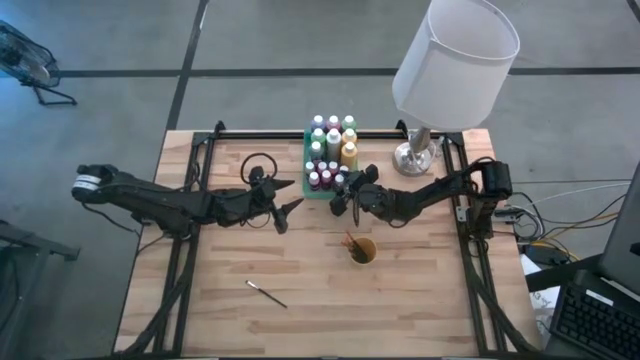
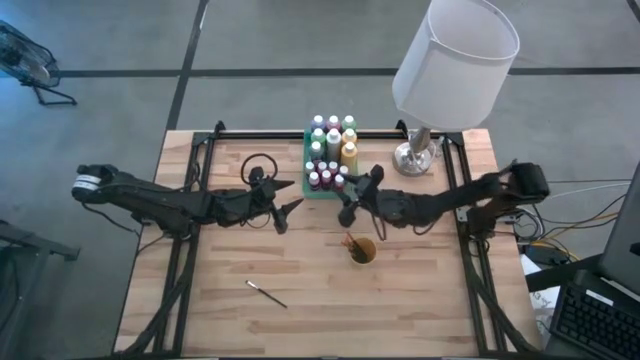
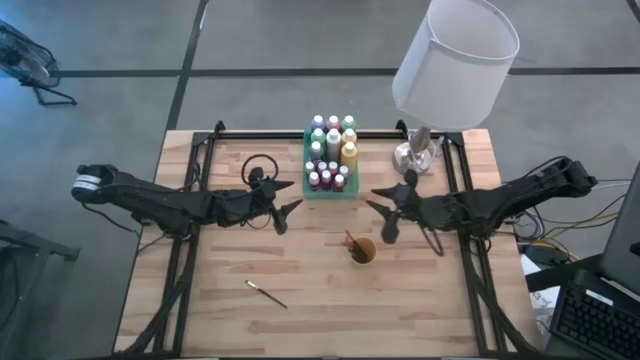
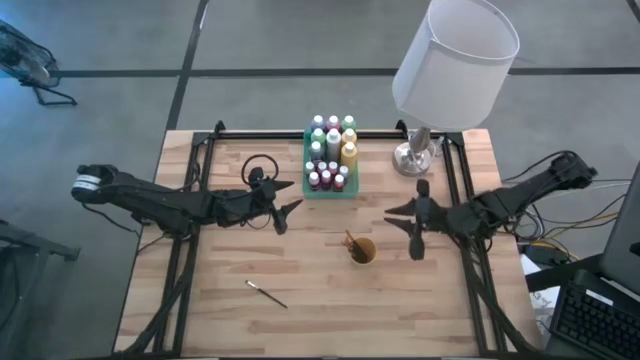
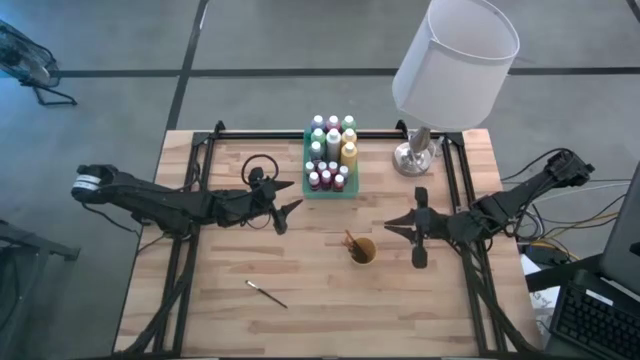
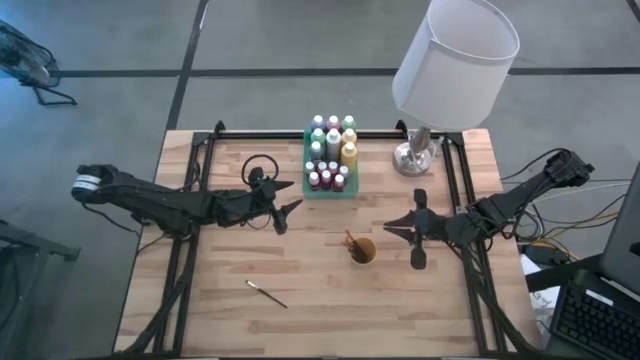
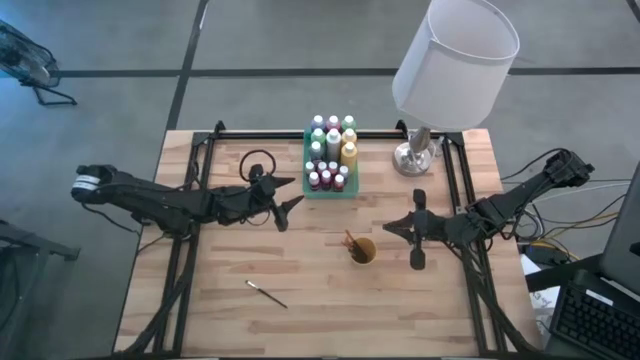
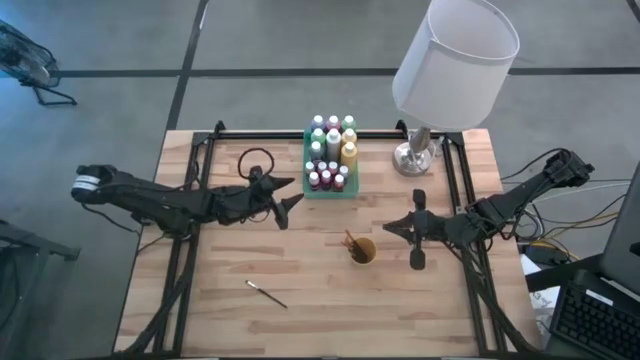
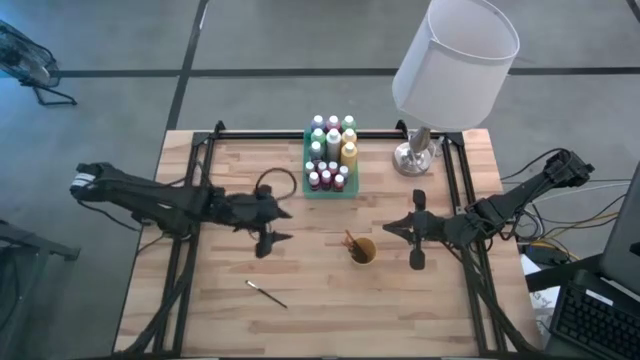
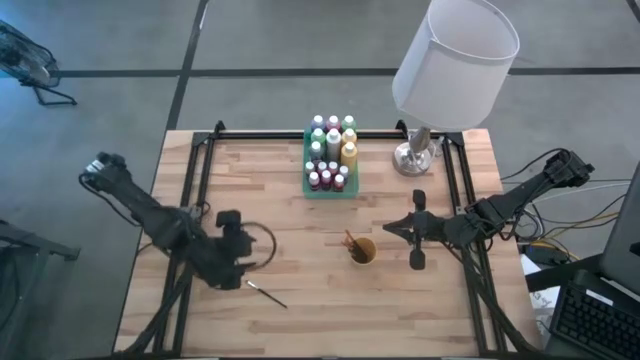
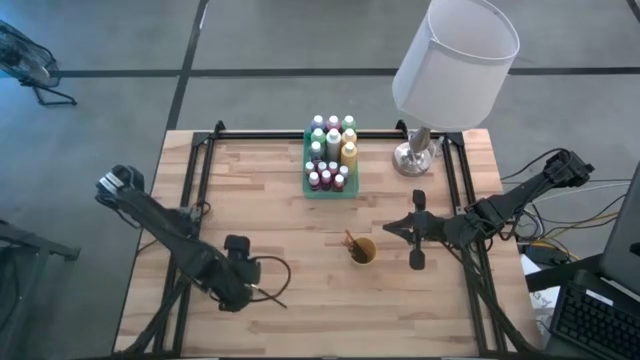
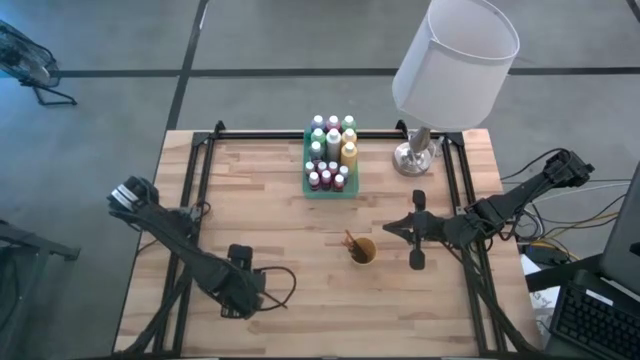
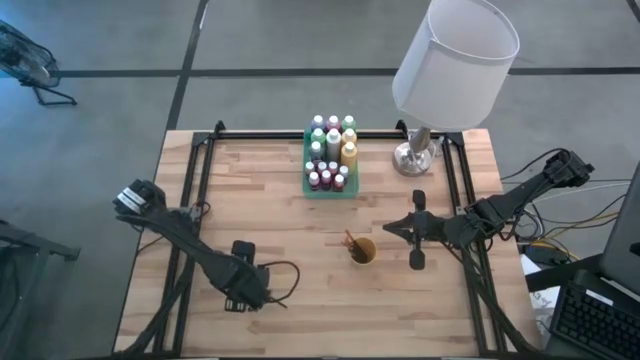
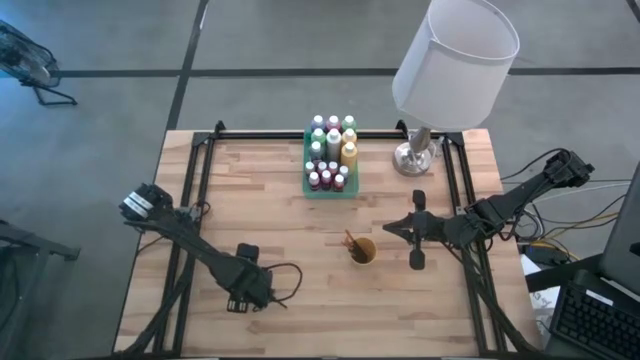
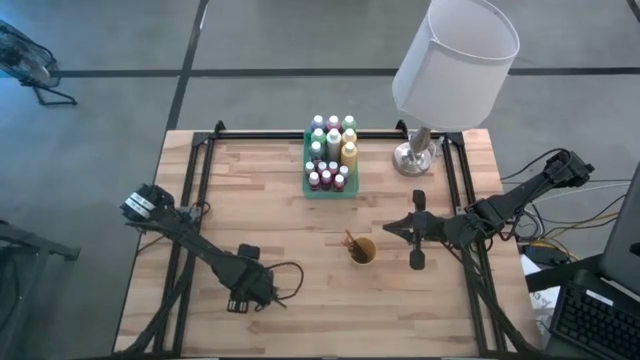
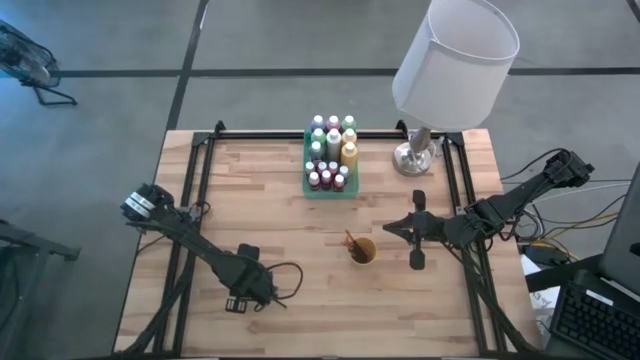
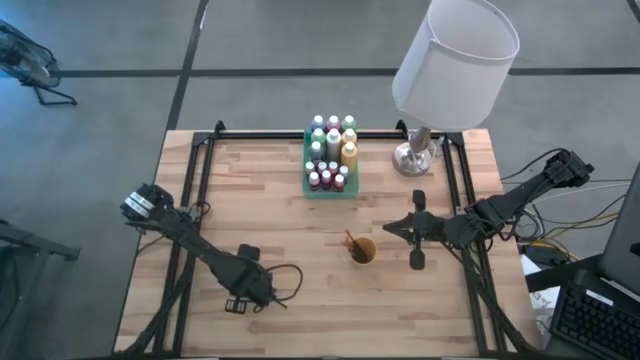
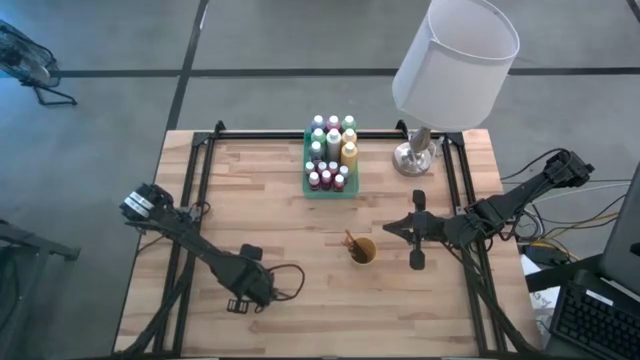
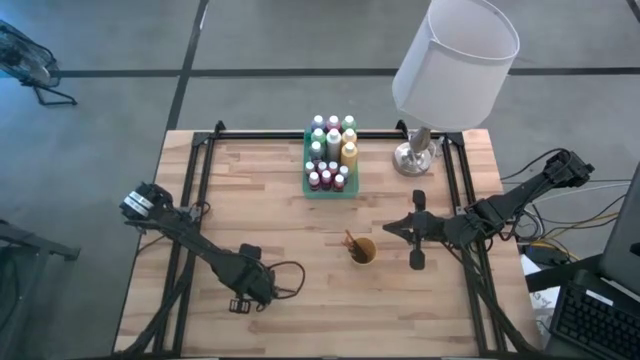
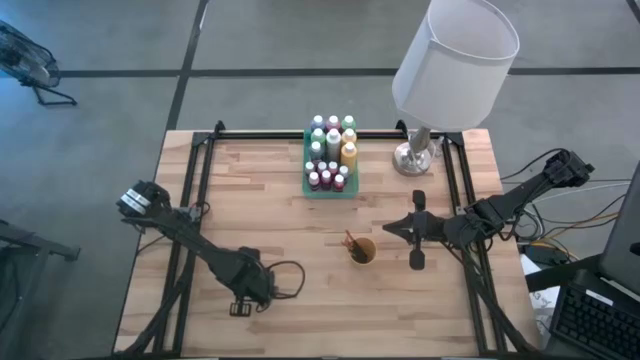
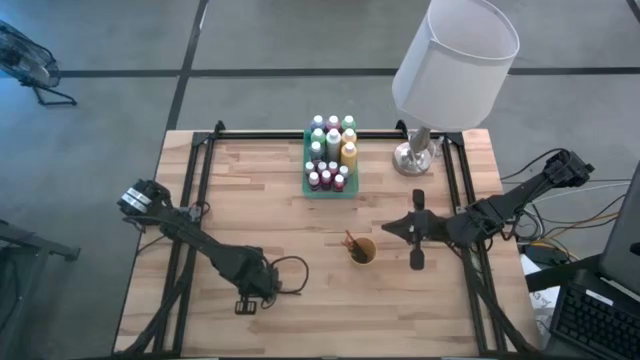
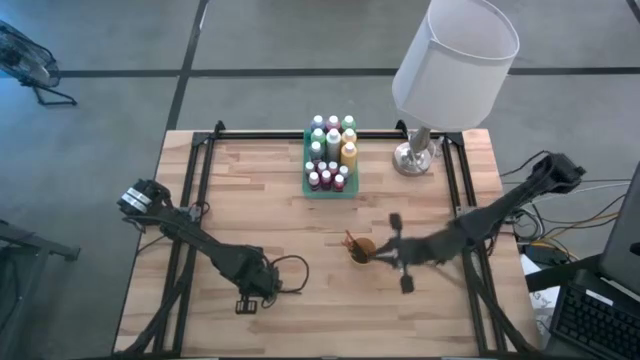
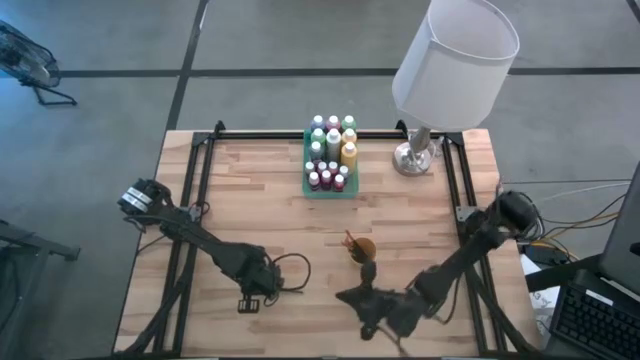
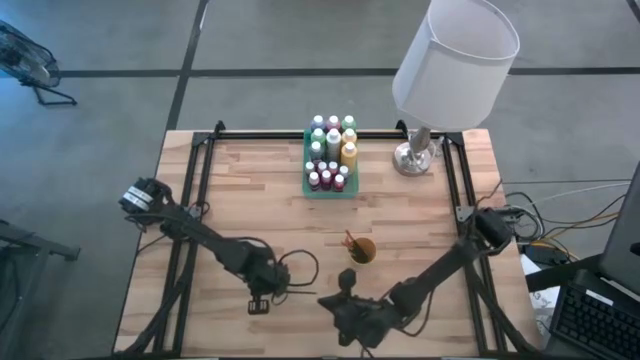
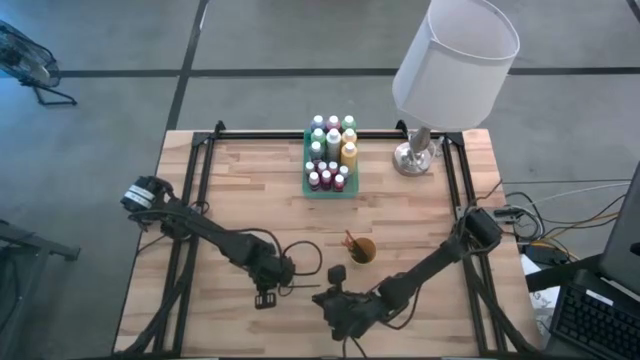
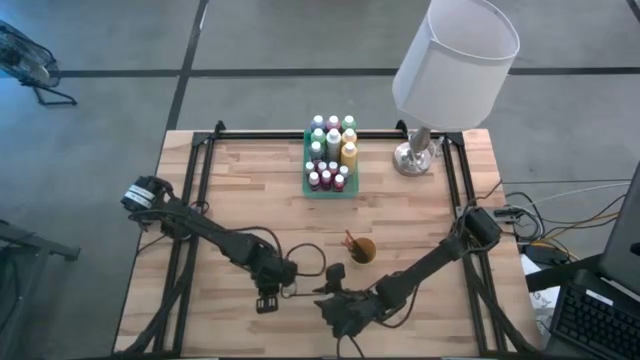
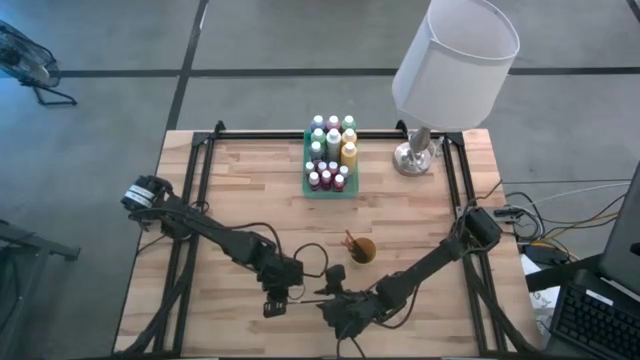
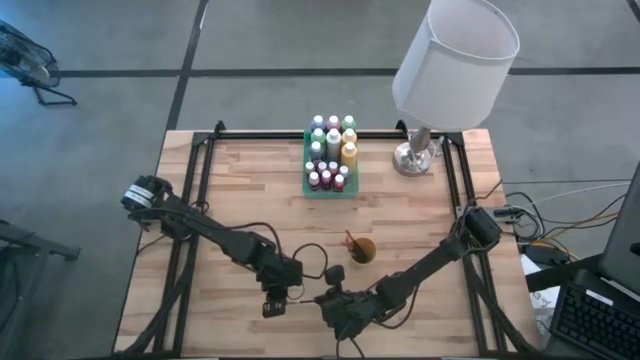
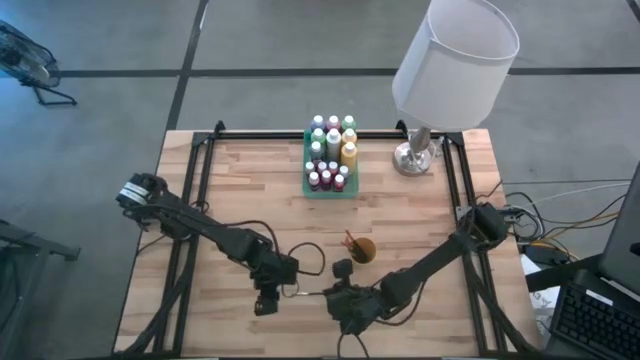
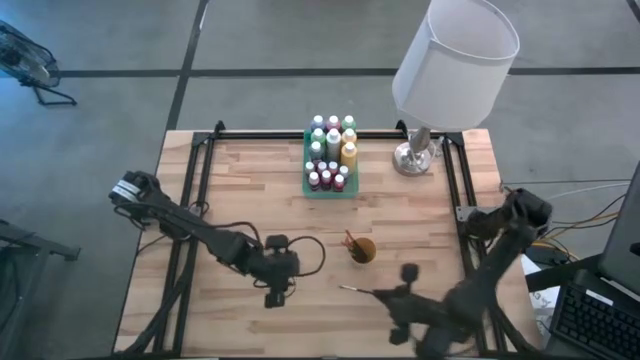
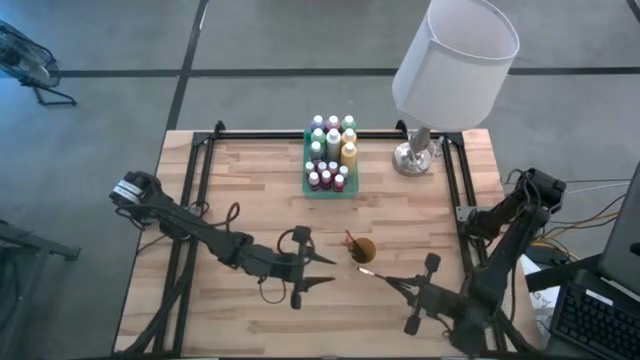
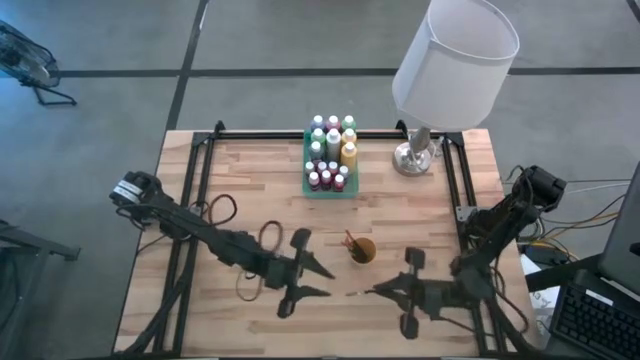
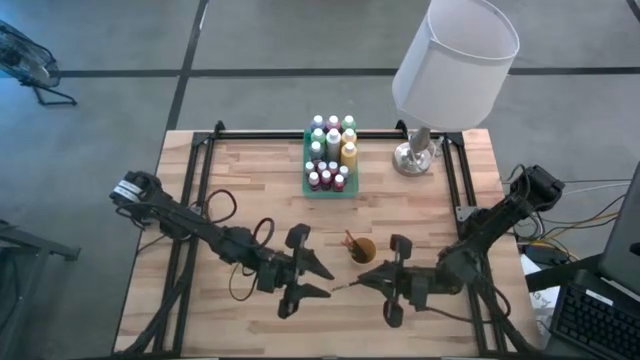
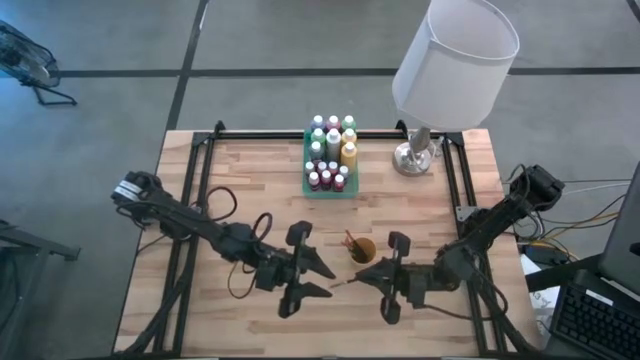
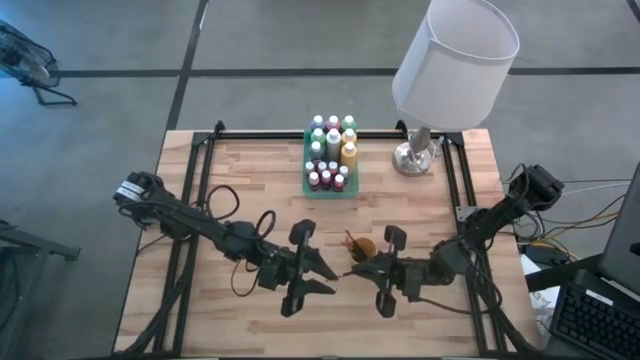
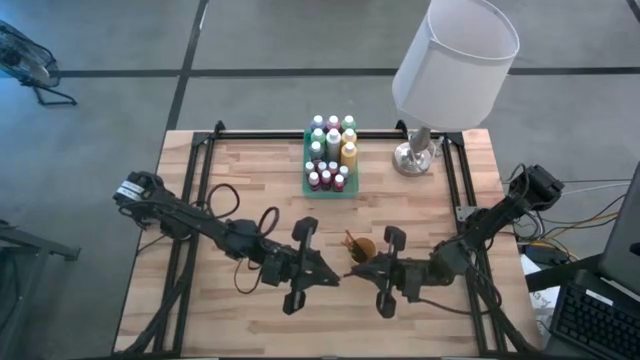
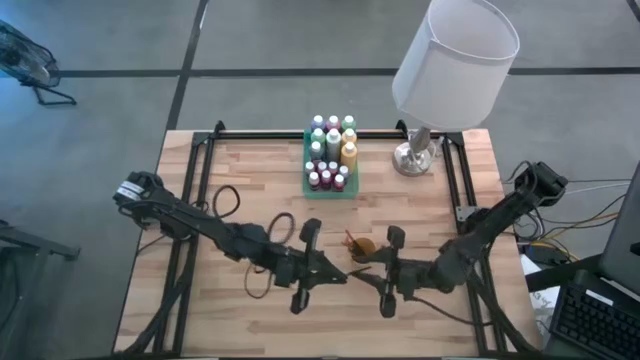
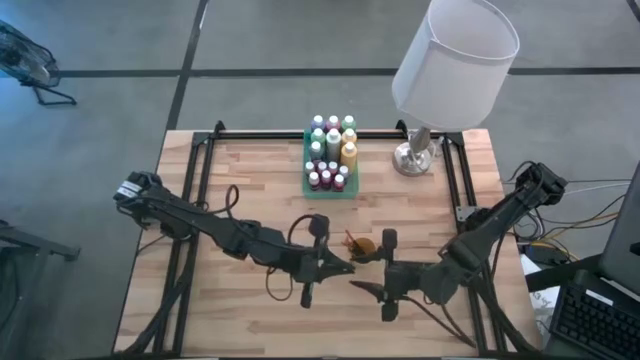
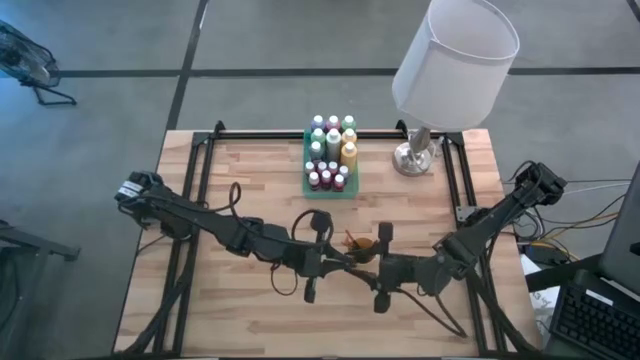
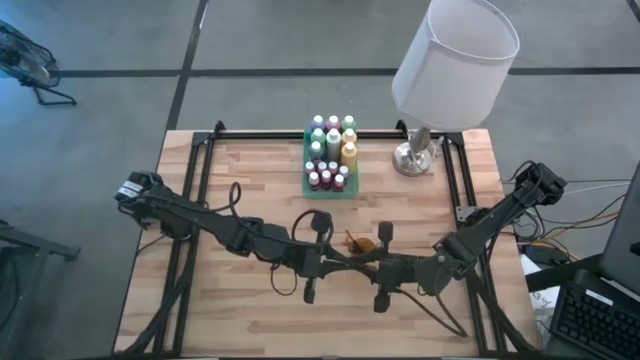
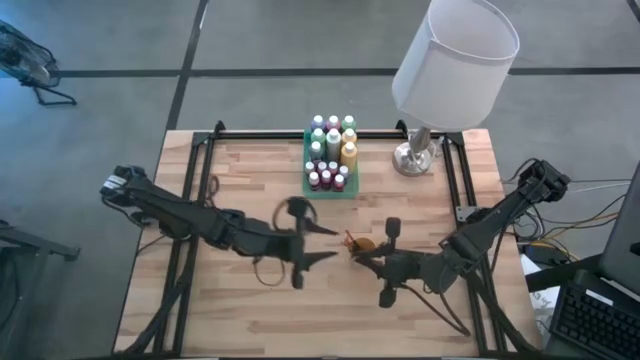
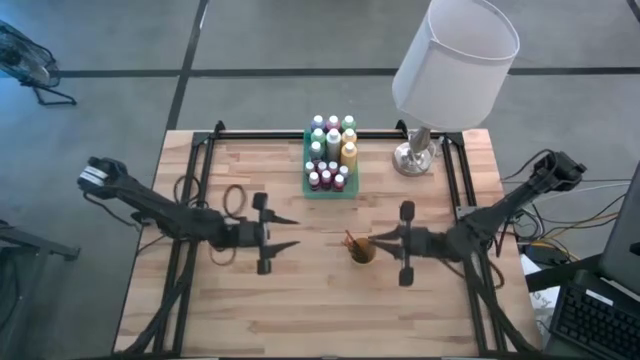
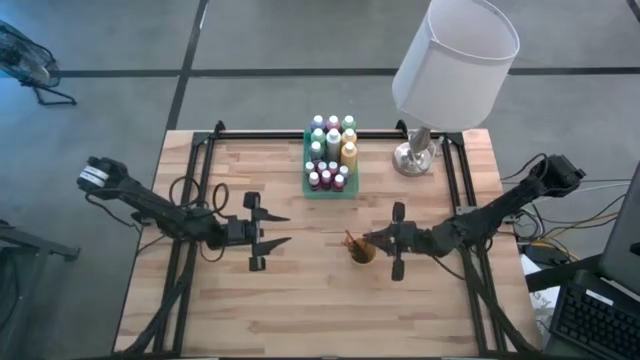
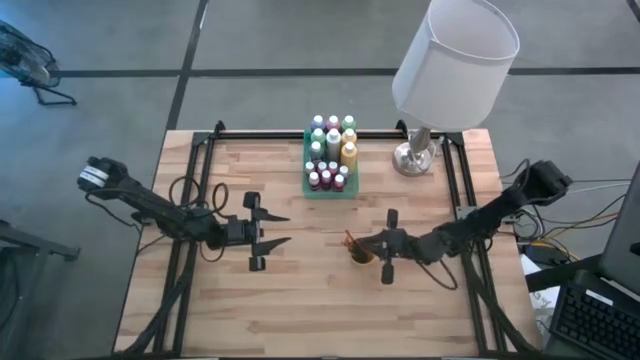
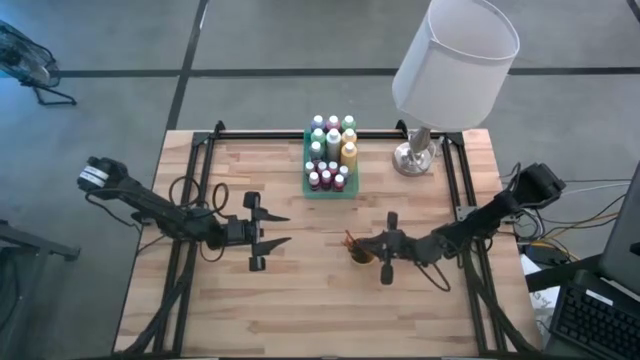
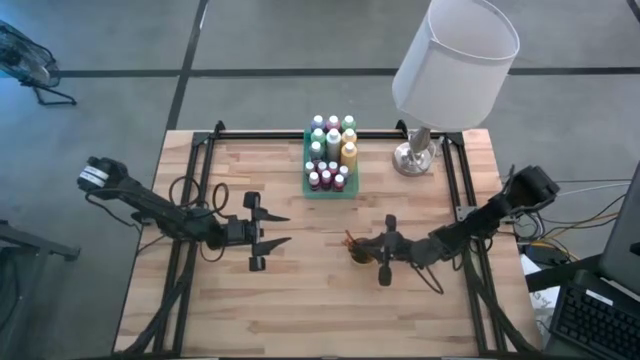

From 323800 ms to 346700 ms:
Task: Pick & Place Paint Supplies
Put the silver paintbrush into the yellow cup
